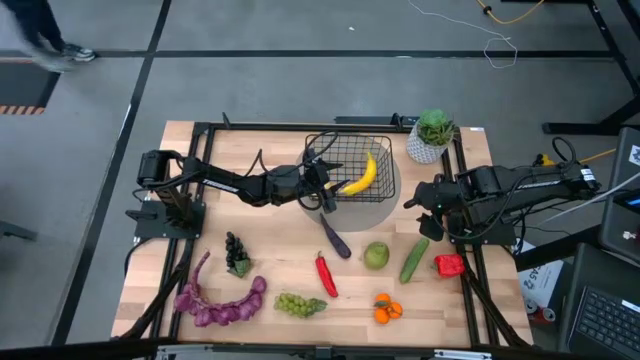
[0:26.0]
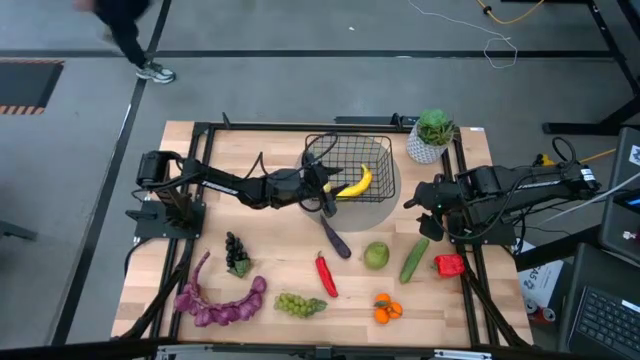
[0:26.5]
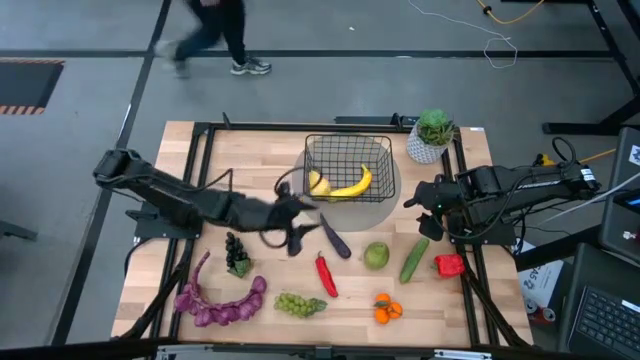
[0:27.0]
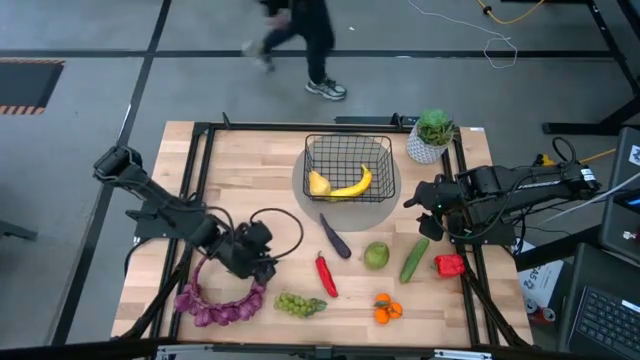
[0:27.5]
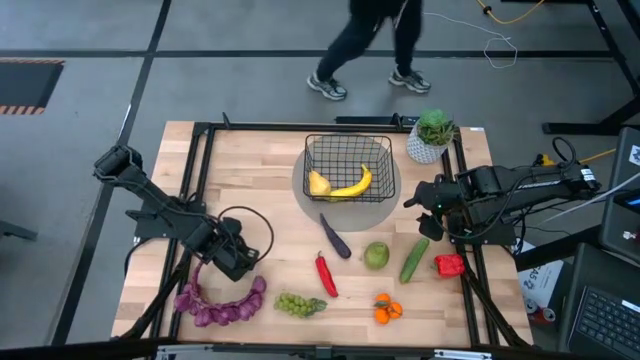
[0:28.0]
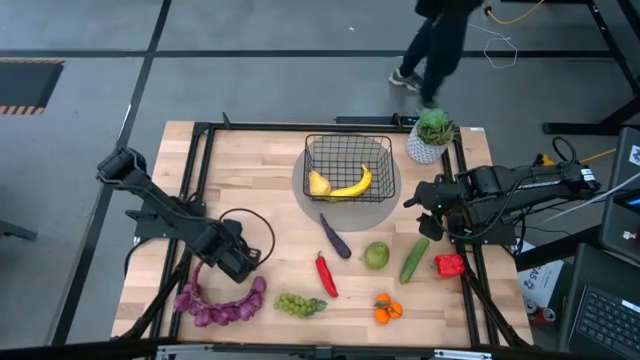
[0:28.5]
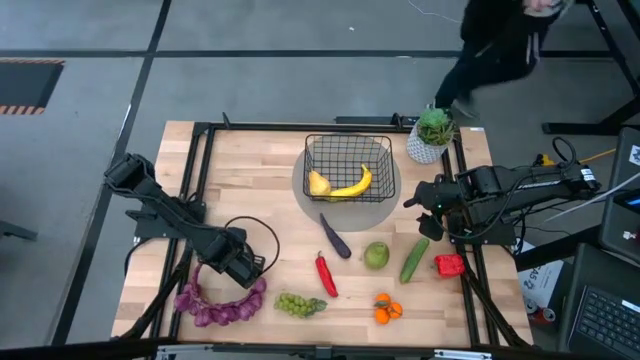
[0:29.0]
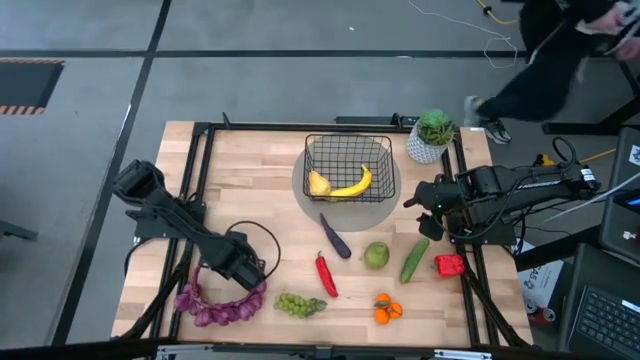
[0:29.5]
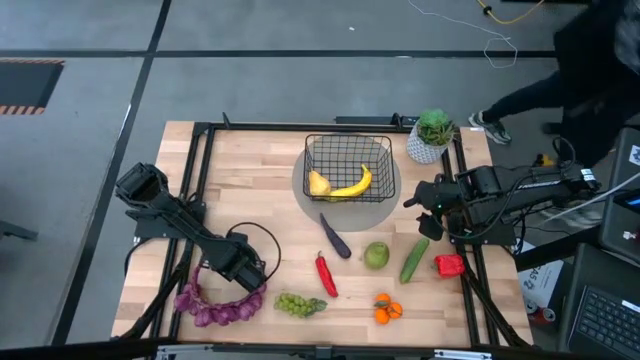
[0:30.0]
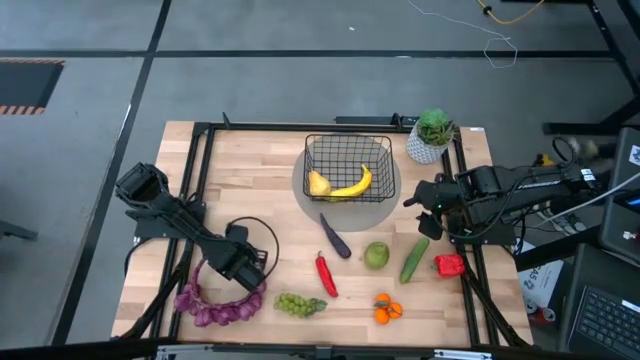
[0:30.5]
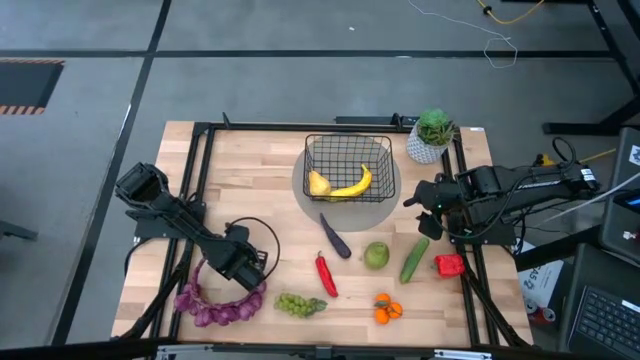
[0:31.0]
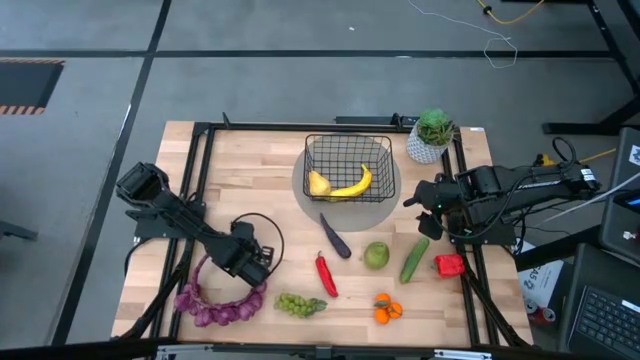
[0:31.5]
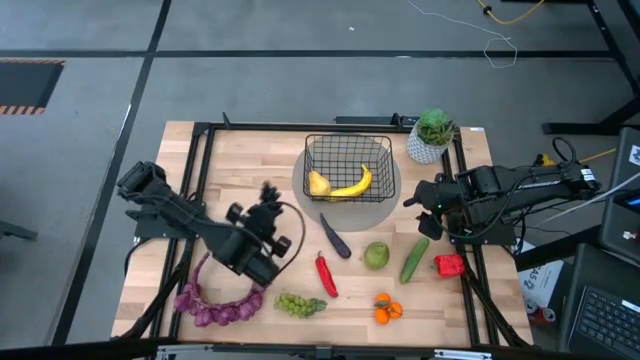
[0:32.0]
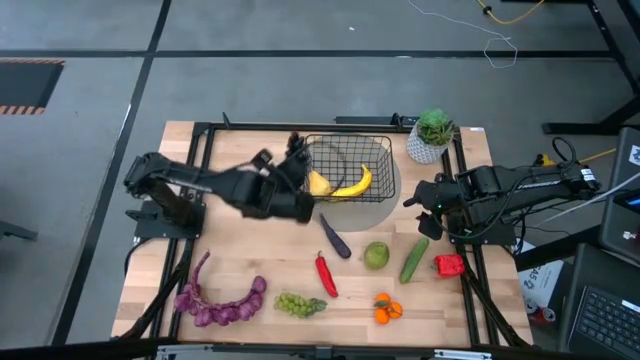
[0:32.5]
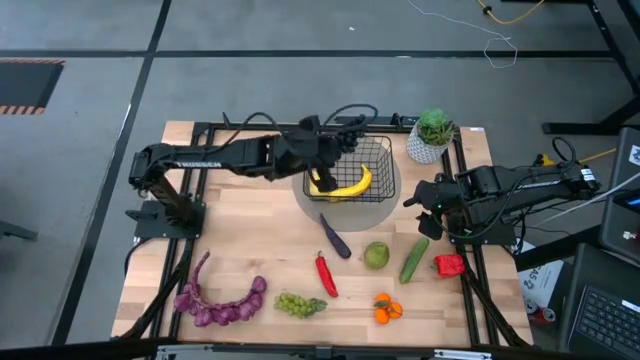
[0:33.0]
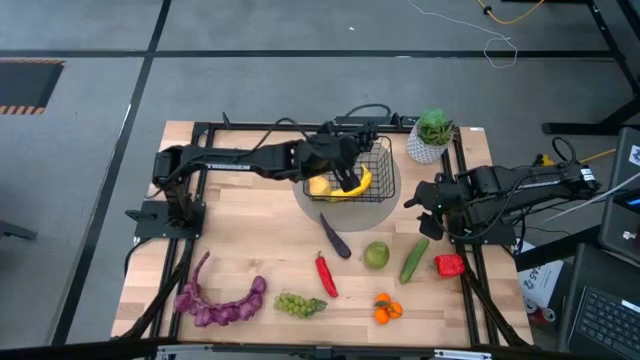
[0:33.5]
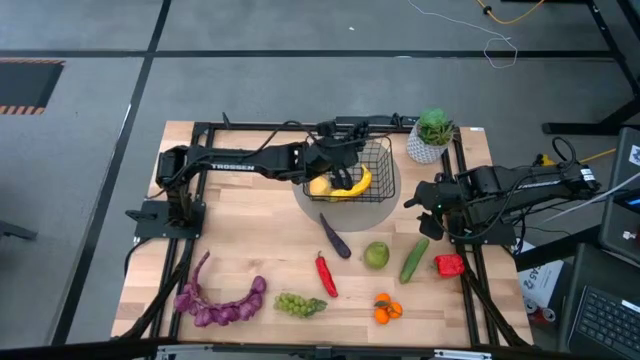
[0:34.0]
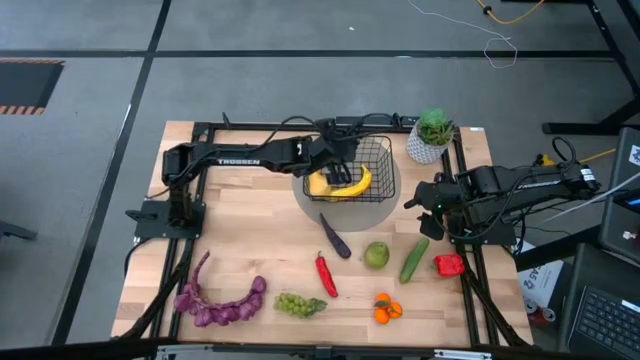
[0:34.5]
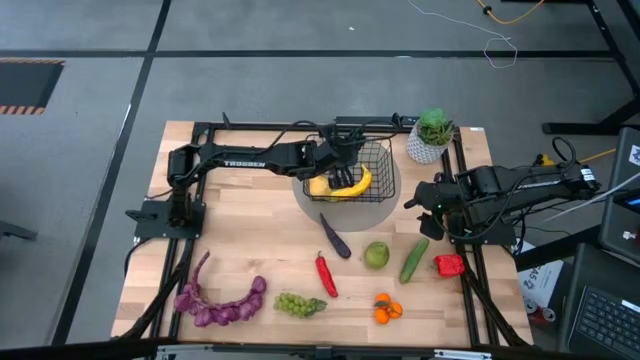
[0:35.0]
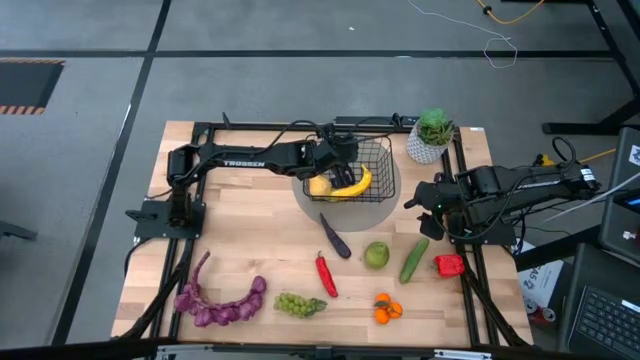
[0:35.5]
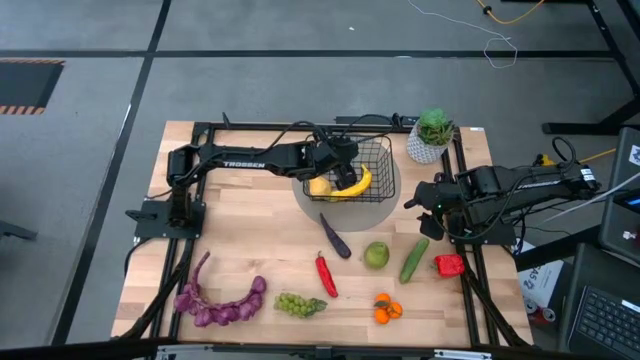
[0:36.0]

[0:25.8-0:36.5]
Task: Build produce basket
Put the black grapes into the black wire basket

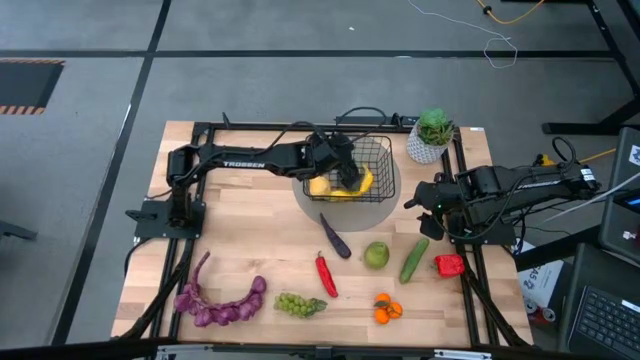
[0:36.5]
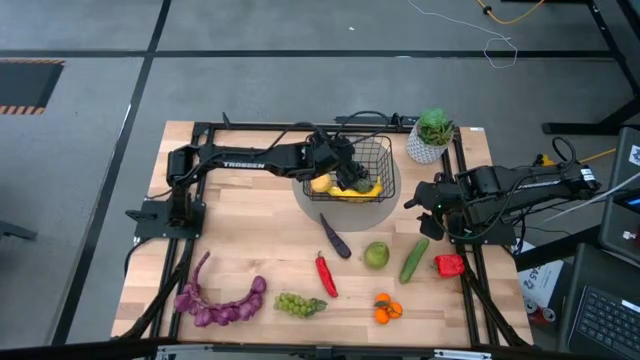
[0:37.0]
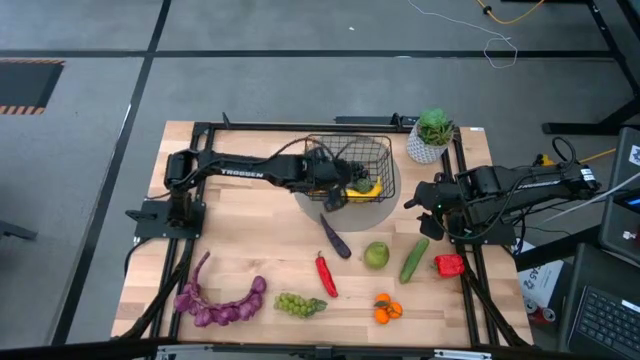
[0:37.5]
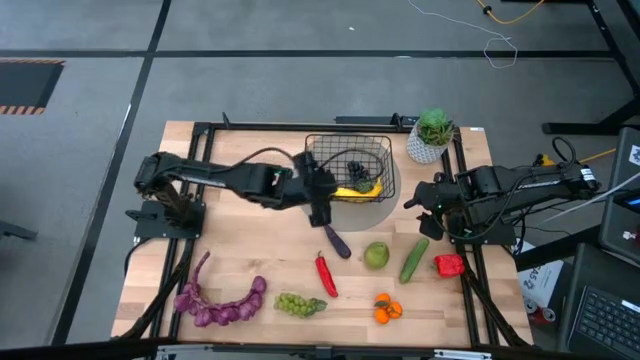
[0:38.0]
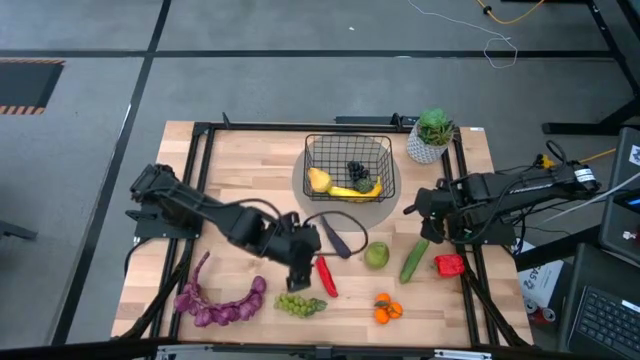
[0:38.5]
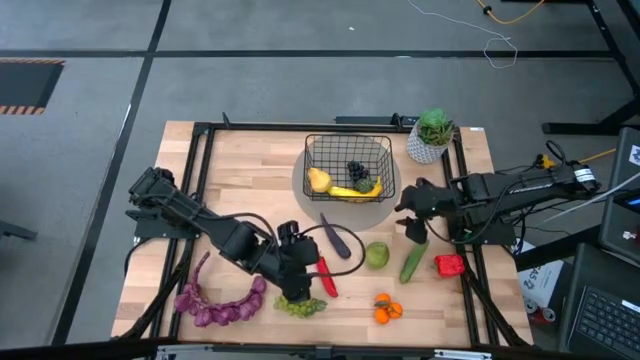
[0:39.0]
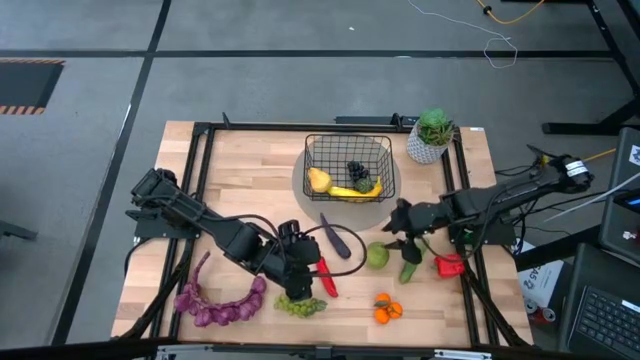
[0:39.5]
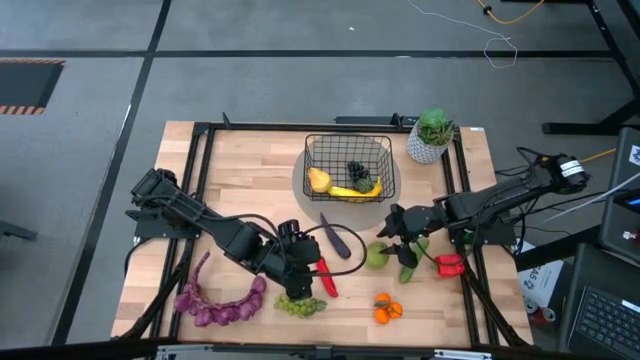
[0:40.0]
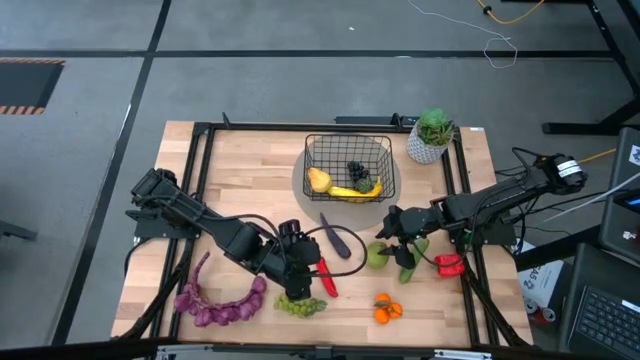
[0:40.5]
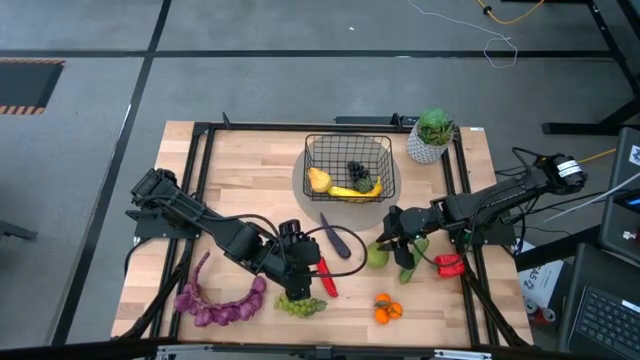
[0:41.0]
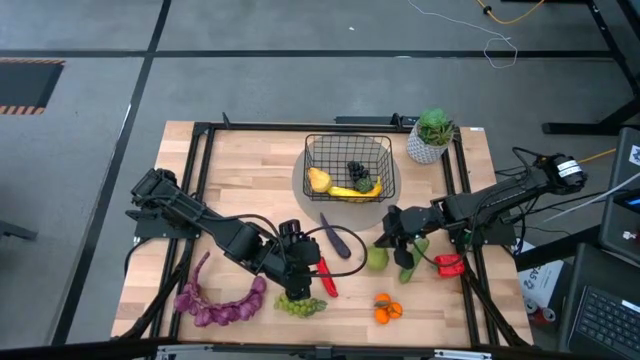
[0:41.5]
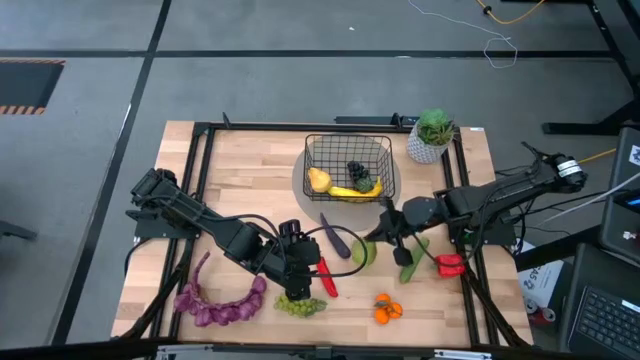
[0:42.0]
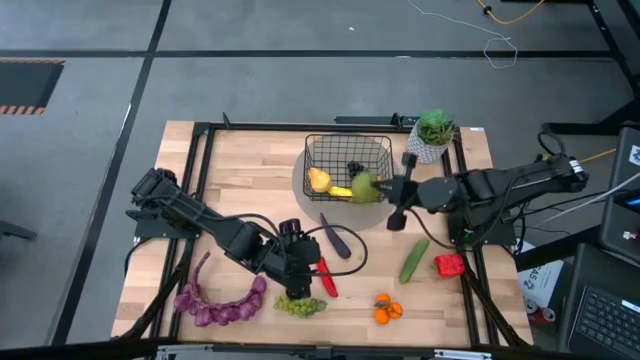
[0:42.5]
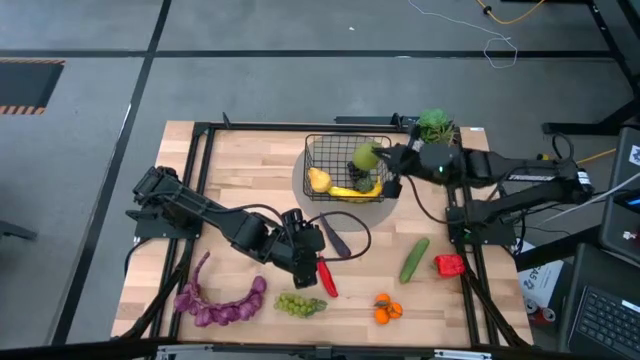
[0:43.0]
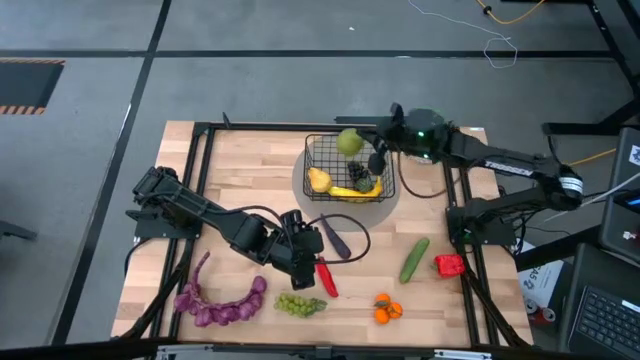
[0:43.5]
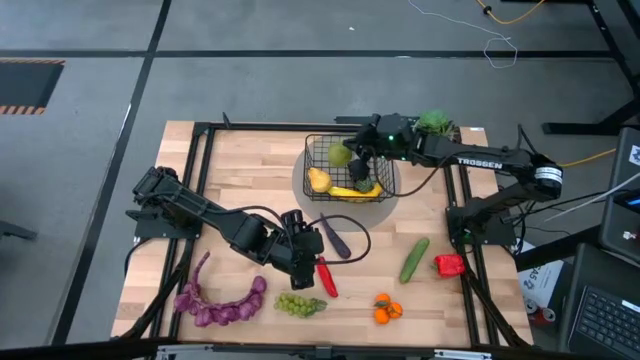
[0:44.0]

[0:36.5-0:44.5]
Put the green pear into the black wire basket

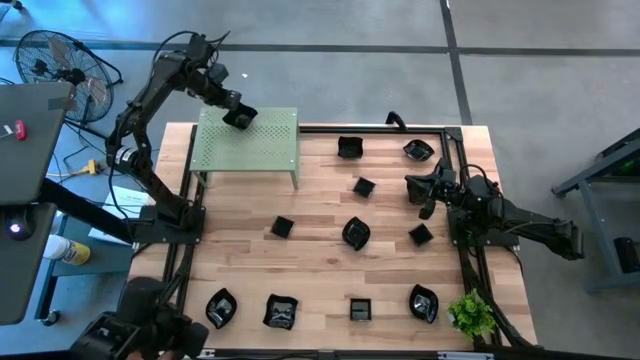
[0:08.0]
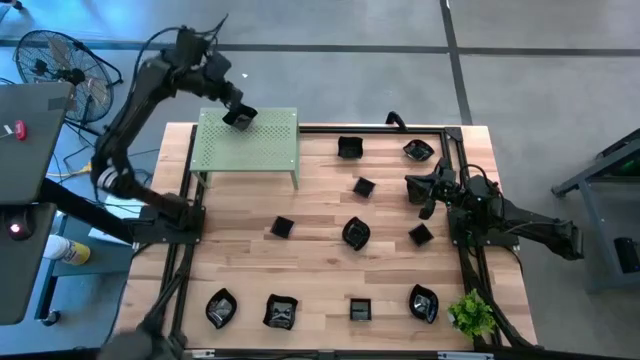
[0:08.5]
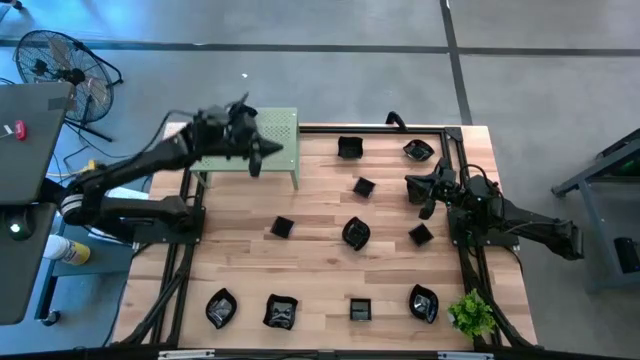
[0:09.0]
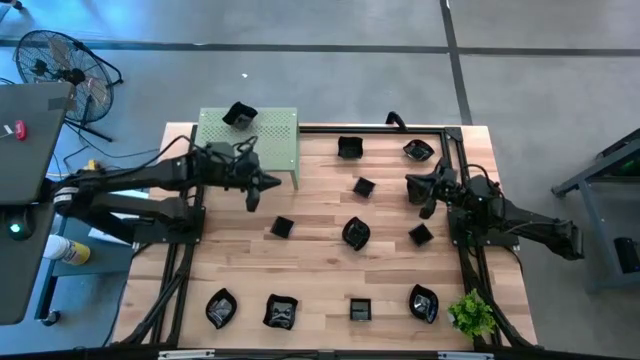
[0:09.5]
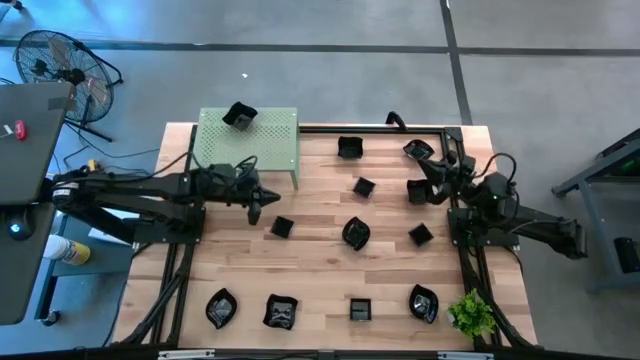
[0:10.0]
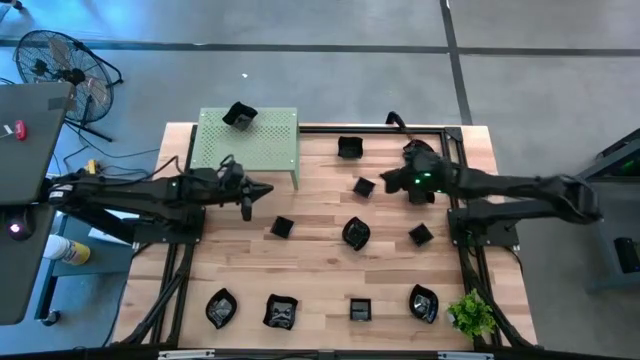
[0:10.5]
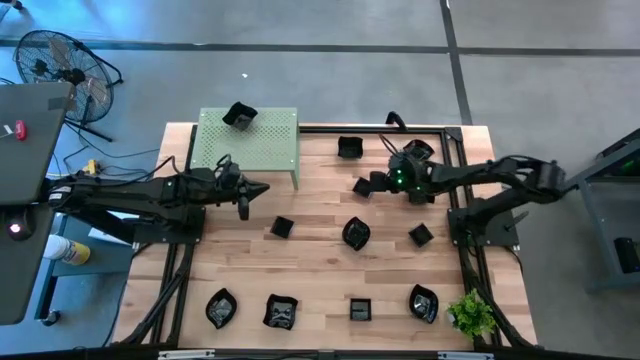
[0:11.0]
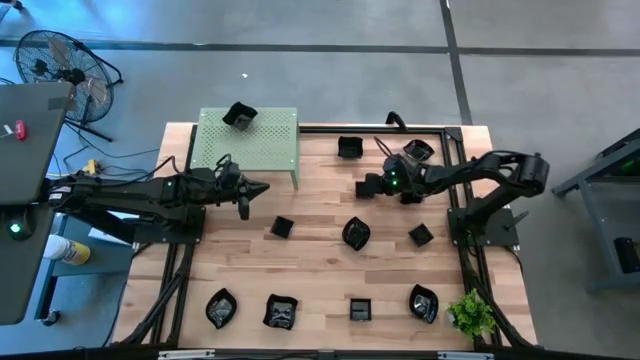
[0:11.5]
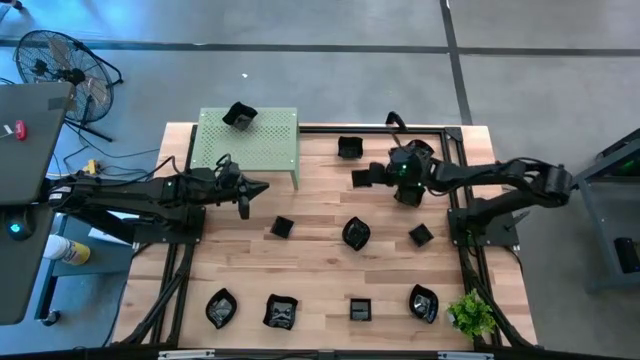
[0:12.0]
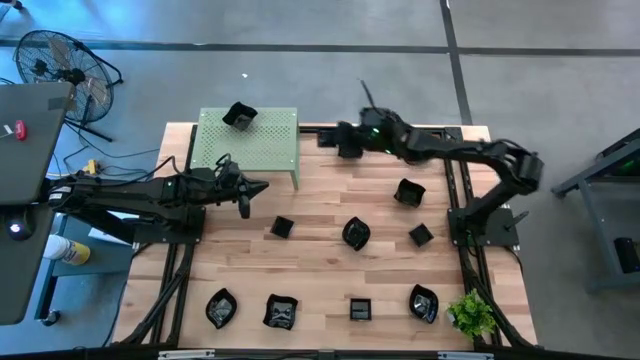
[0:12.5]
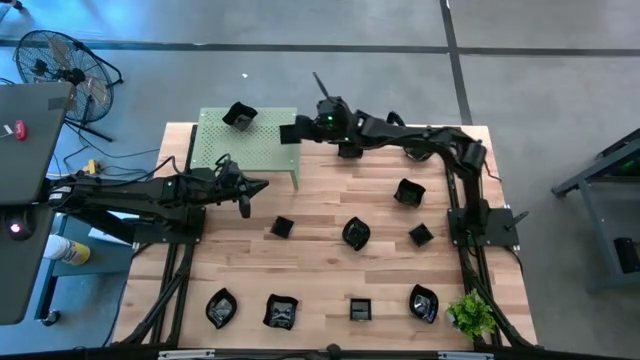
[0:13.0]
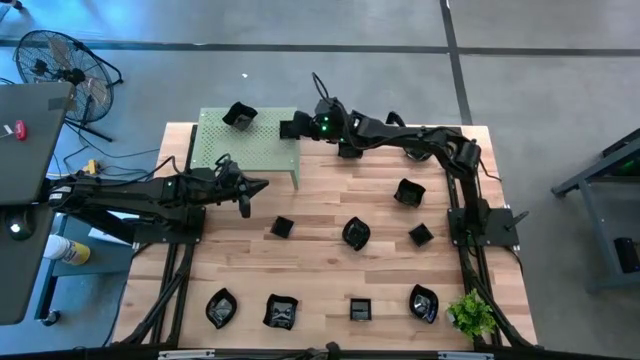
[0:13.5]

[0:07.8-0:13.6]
Task: Pick & Place Mini shaped plates
Put the black square plate on the shelf
